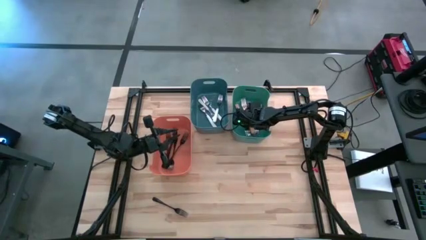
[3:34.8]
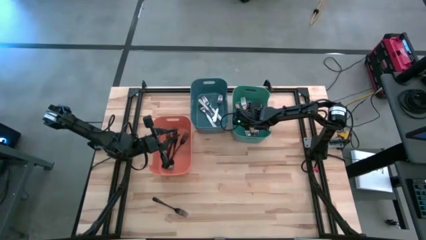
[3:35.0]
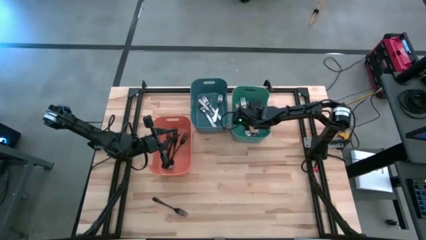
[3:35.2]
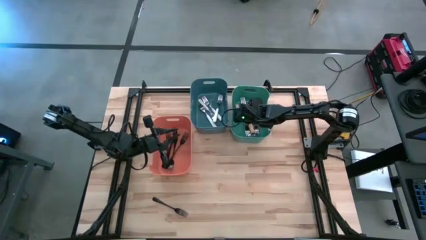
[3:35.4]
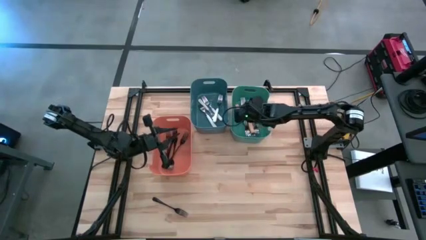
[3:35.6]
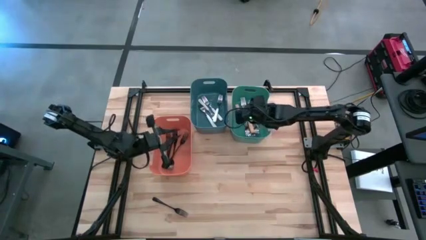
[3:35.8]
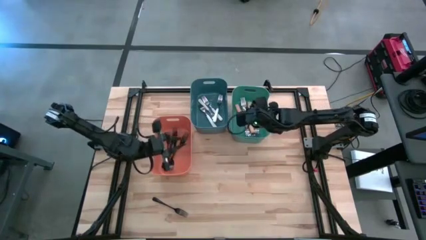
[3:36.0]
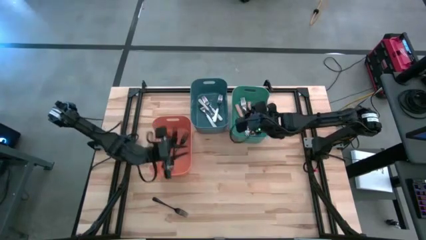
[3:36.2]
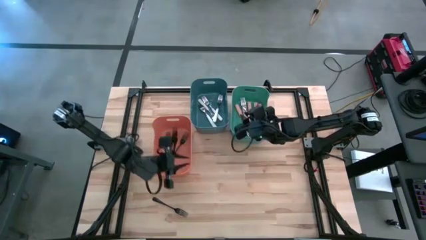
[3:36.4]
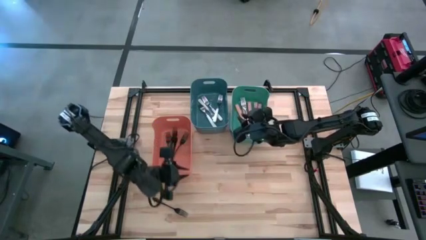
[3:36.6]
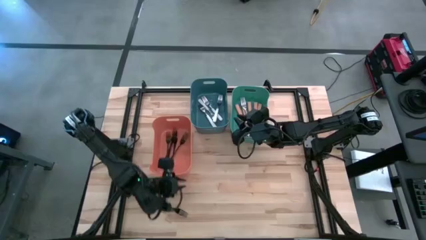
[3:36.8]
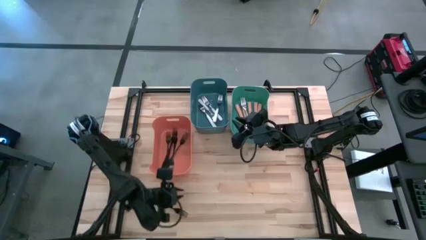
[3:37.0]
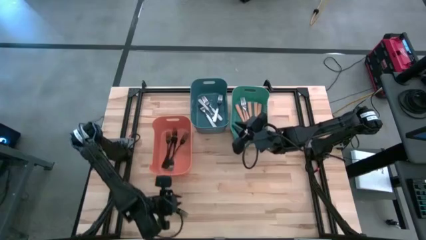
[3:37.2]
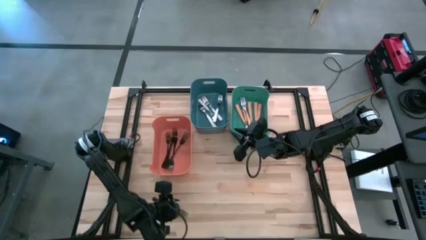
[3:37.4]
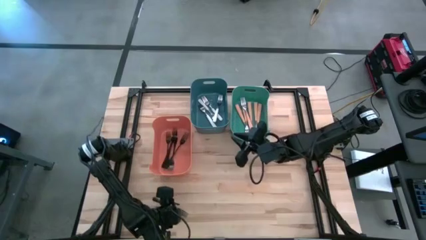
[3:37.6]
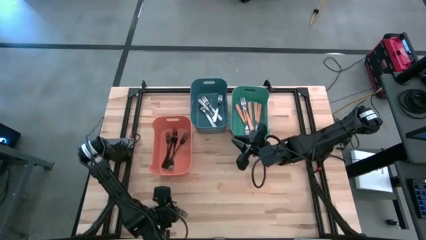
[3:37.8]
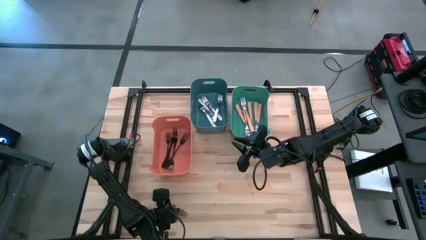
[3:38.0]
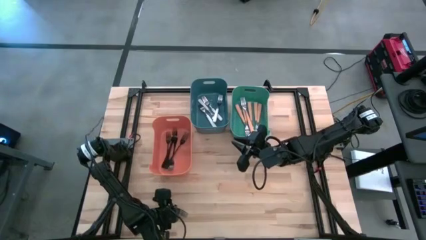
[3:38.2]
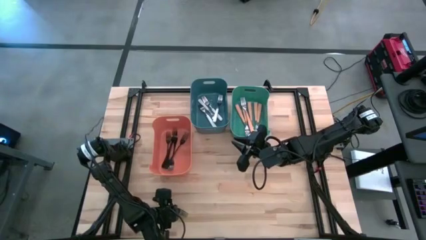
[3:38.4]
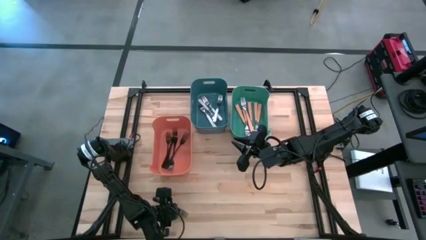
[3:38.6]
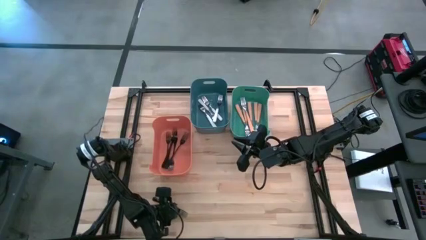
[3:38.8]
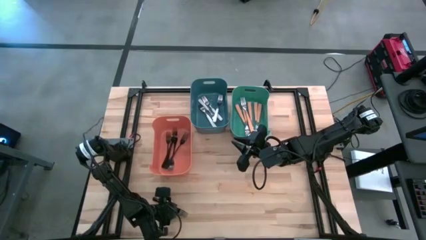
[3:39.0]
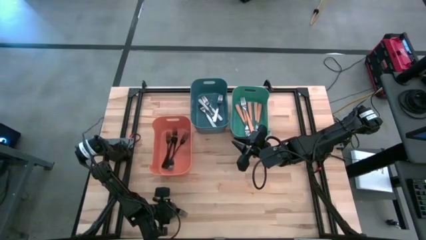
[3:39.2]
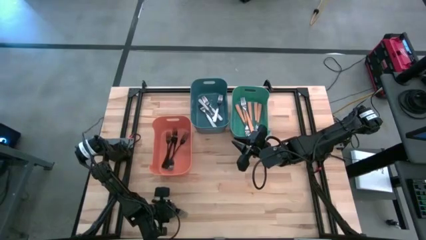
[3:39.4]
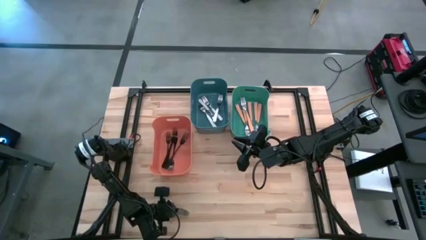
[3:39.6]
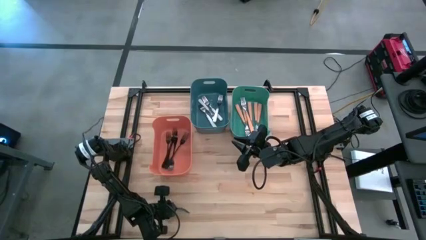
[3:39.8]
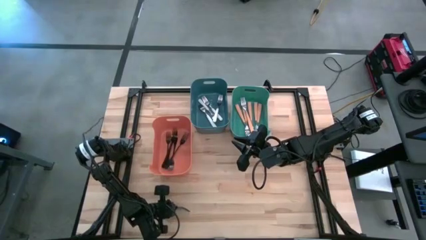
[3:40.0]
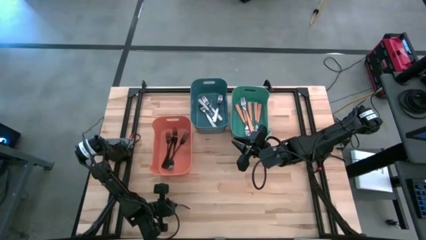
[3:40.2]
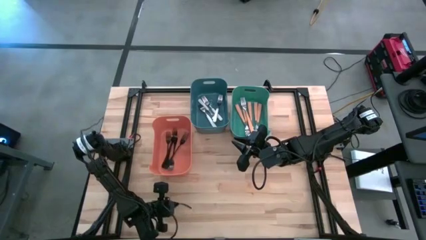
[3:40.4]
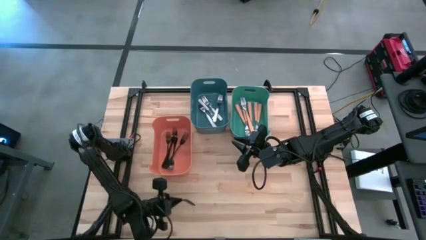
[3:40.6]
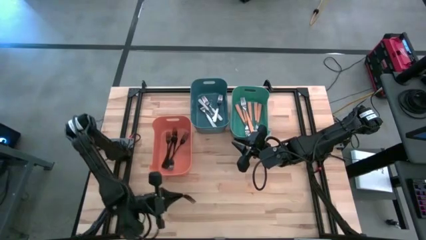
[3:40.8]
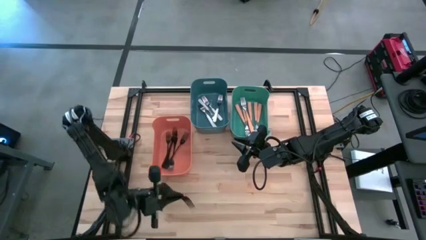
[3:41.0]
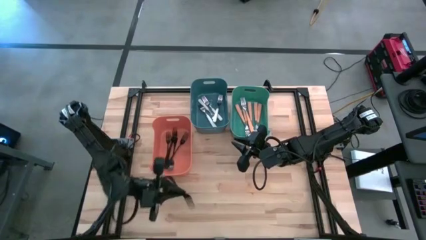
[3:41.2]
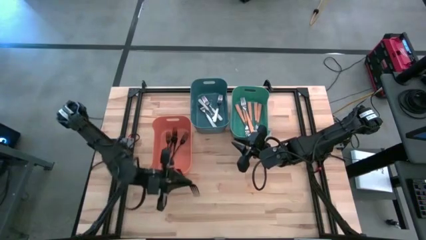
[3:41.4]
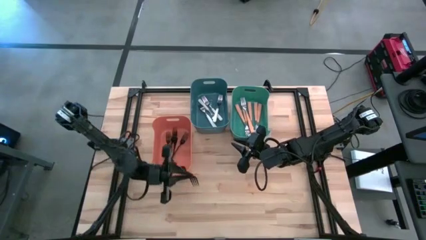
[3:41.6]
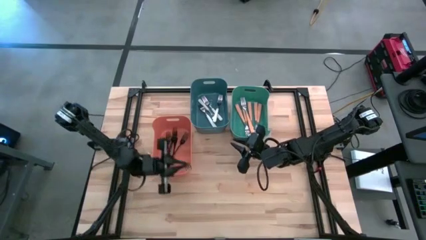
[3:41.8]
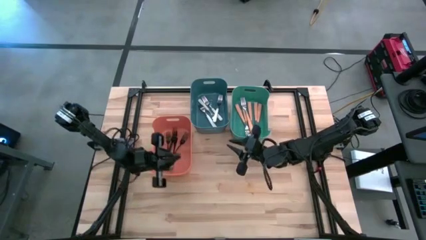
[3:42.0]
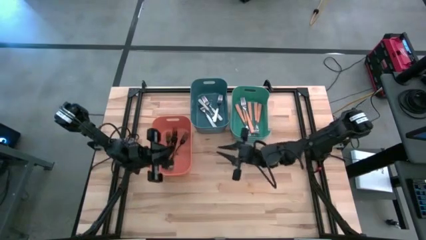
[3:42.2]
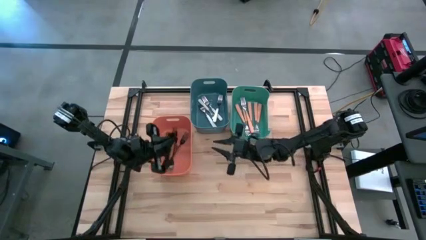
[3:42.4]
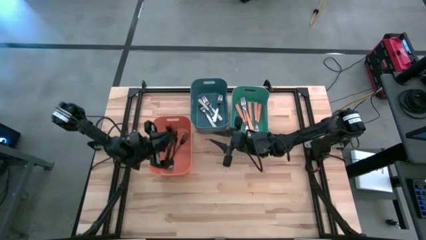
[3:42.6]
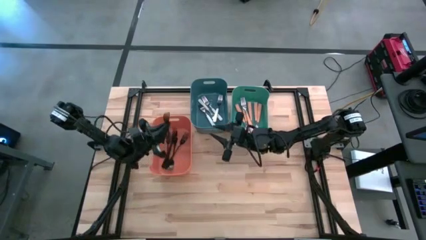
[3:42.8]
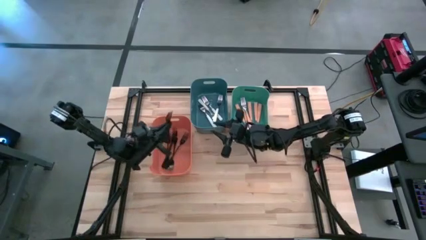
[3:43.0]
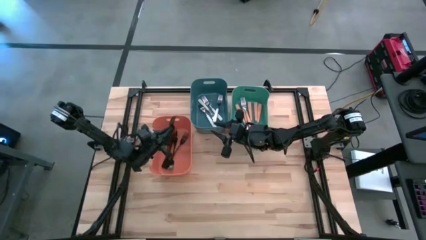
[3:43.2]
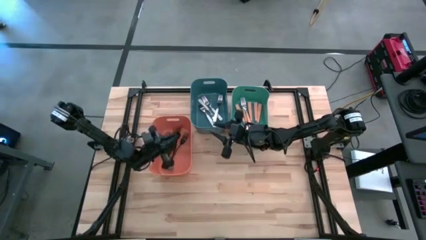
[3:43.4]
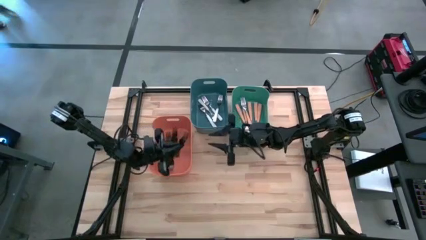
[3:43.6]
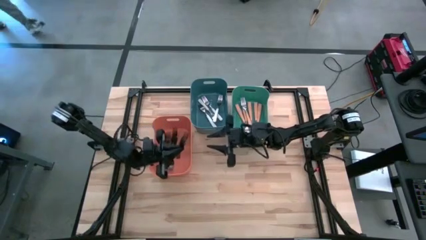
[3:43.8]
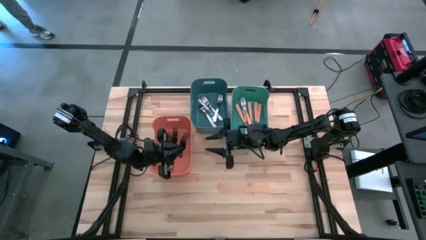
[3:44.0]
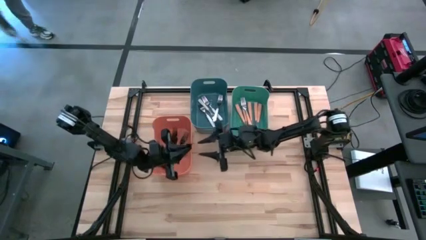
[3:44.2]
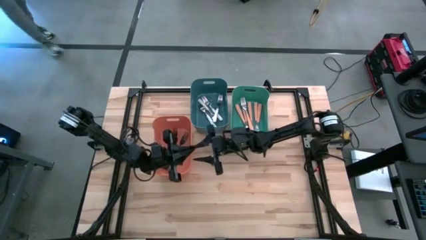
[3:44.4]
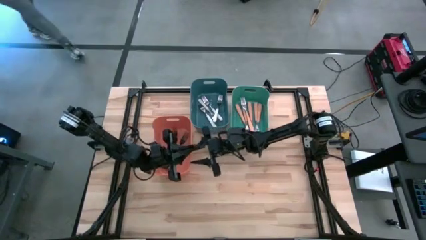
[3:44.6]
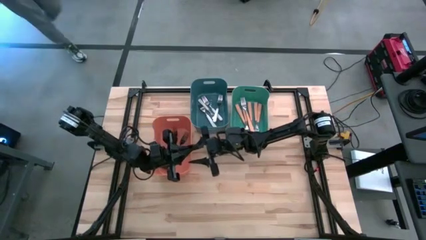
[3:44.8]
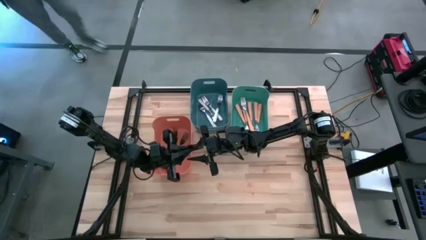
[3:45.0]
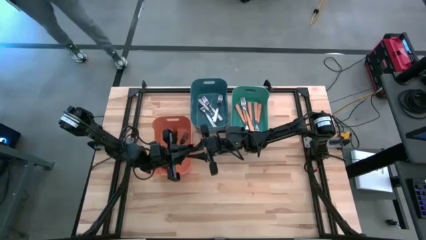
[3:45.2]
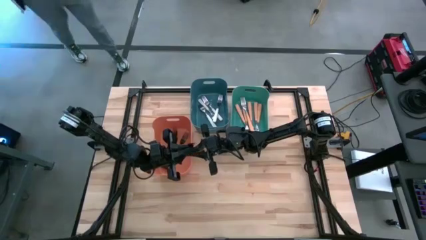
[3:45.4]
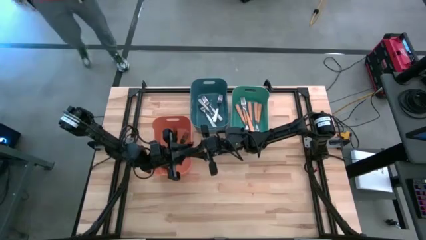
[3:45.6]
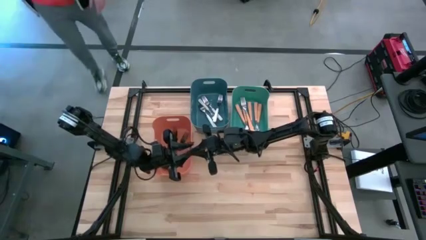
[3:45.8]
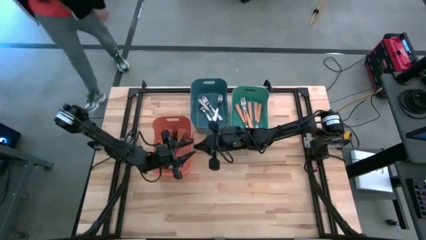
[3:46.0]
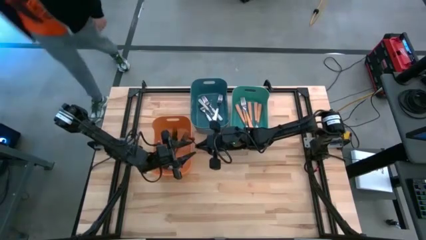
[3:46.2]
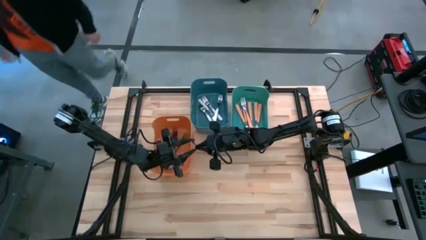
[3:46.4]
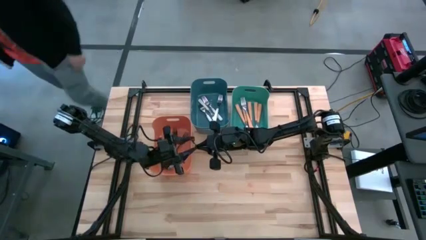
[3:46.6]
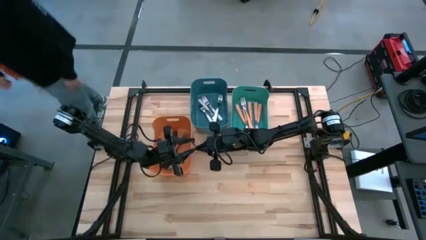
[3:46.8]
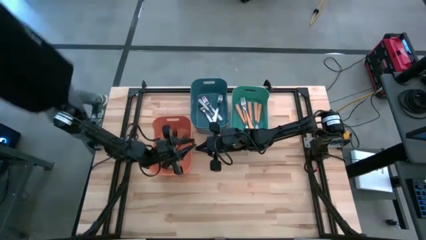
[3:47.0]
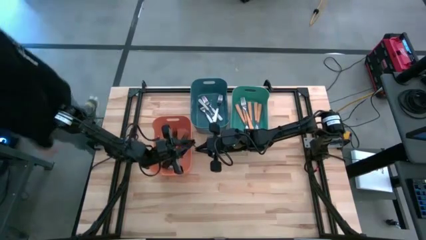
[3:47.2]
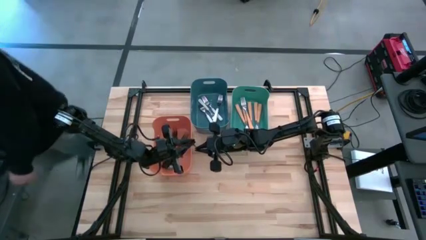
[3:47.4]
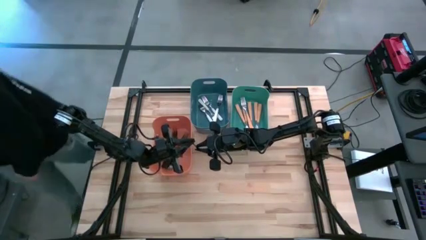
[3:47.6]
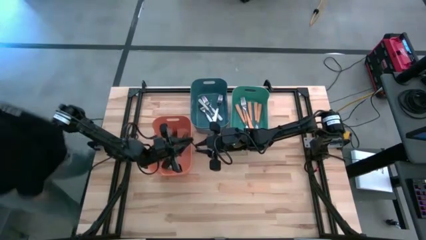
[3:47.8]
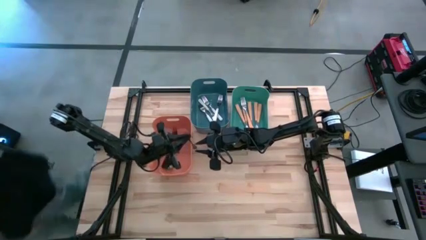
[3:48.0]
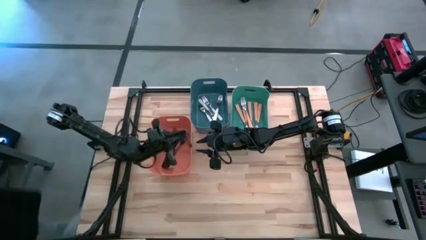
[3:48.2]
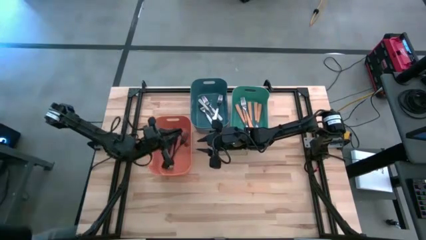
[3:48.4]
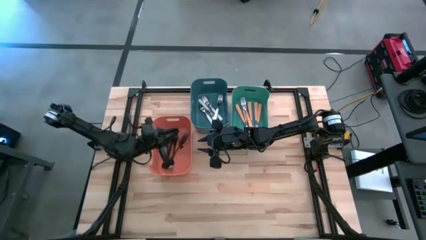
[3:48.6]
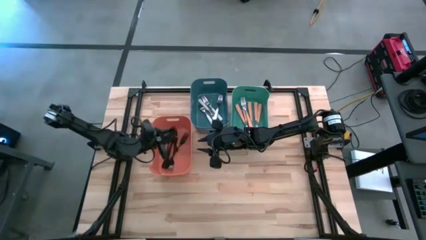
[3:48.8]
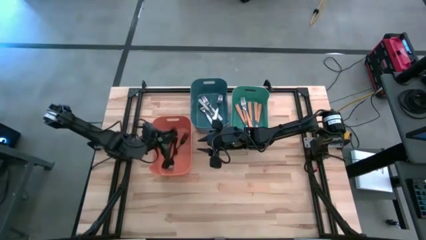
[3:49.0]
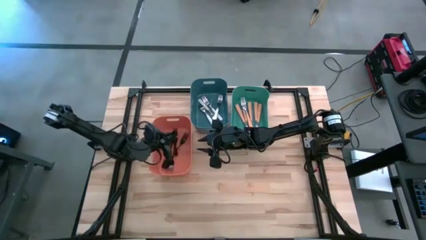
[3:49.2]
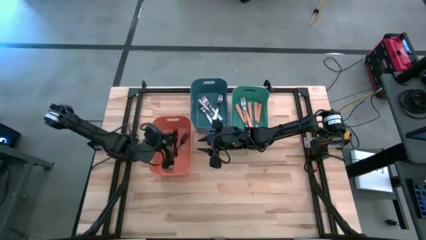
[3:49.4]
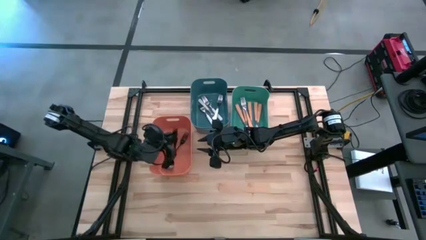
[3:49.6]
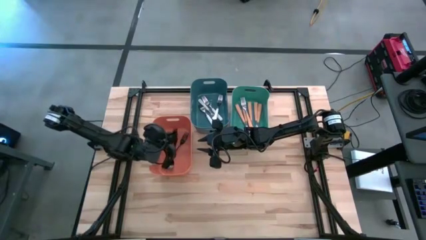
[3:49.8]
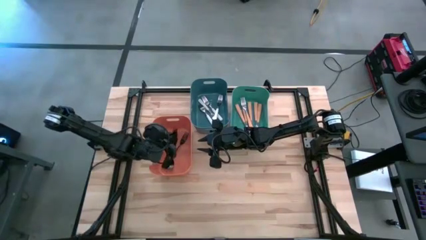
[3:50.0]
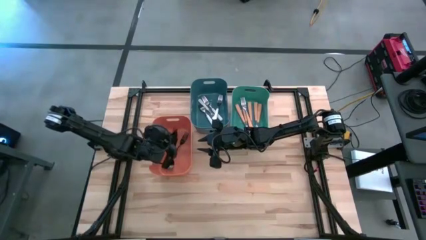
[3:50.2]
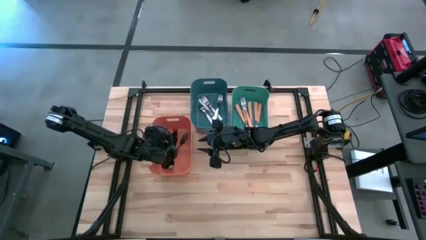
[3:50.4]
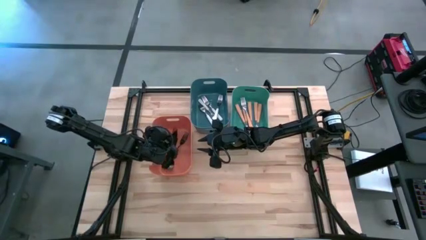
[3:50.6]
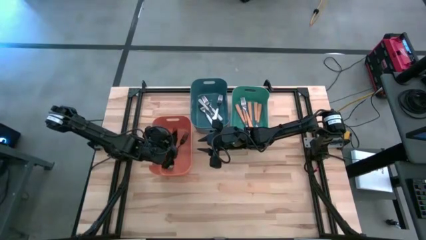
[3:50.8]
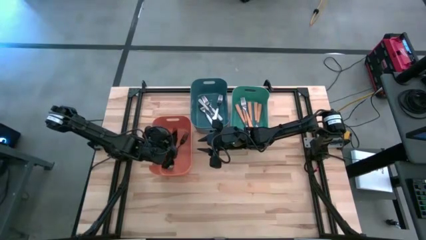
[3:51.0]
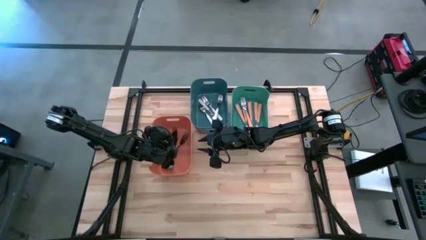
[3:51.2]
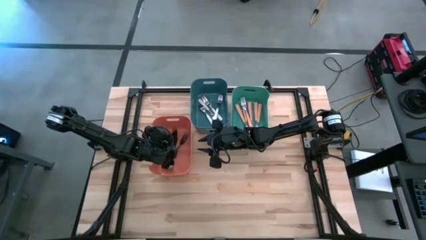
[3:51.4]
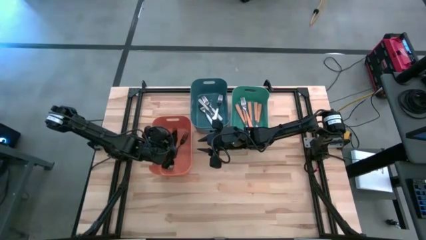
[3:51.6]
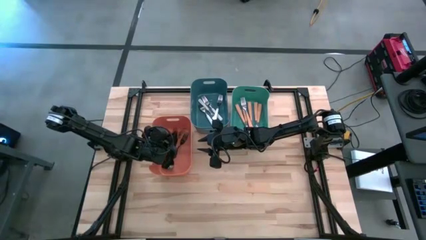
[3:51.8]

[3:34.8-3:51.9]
Task: Sort silverware by color (type)
Put the black fork into the orange bin
